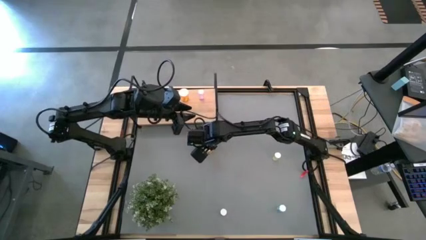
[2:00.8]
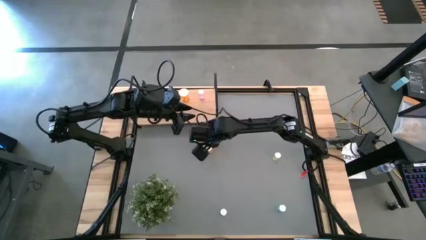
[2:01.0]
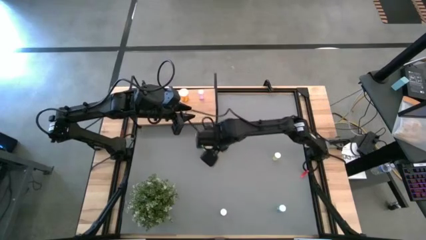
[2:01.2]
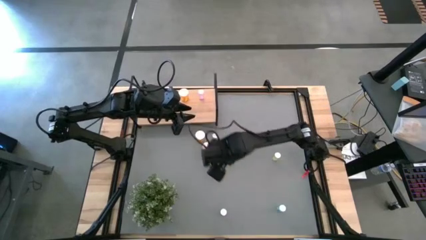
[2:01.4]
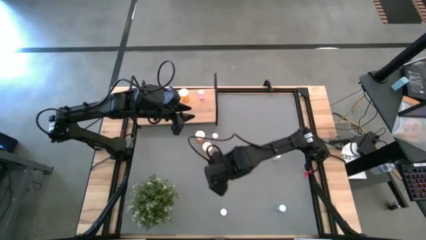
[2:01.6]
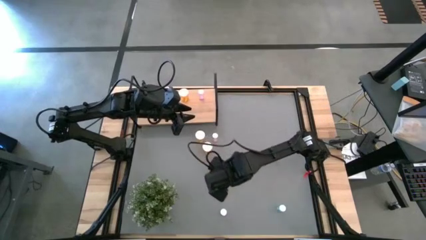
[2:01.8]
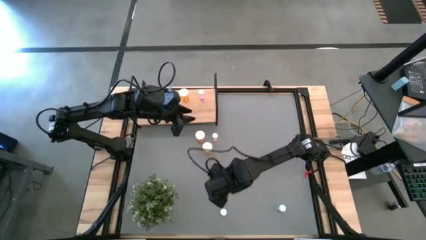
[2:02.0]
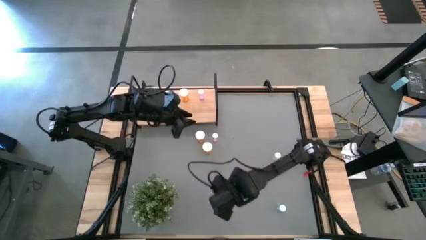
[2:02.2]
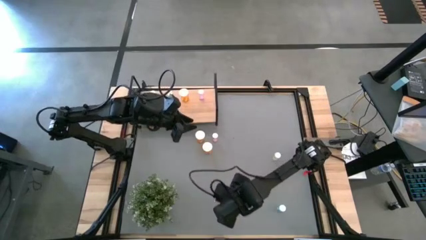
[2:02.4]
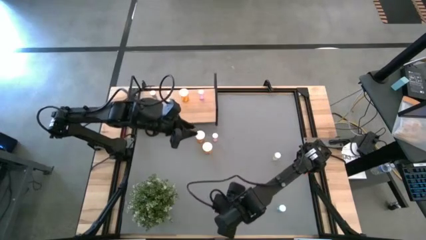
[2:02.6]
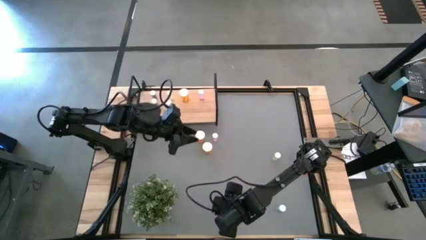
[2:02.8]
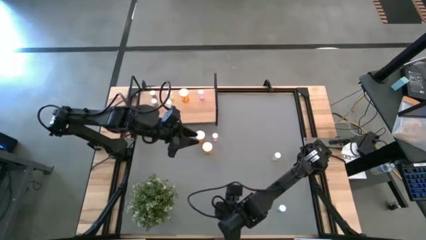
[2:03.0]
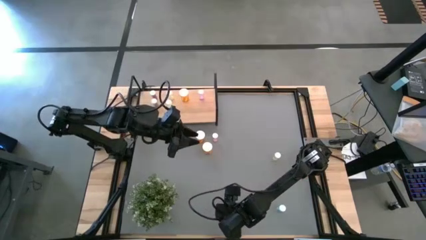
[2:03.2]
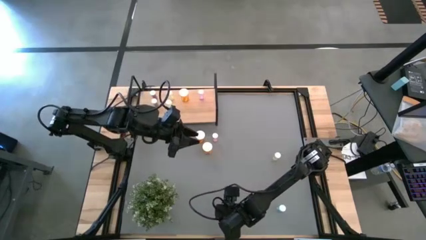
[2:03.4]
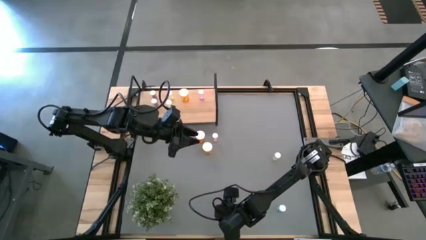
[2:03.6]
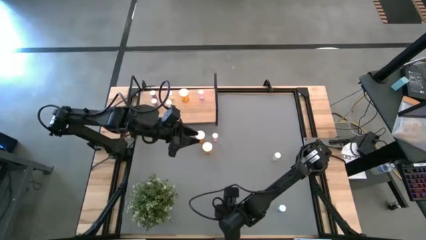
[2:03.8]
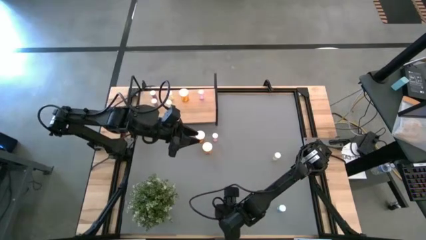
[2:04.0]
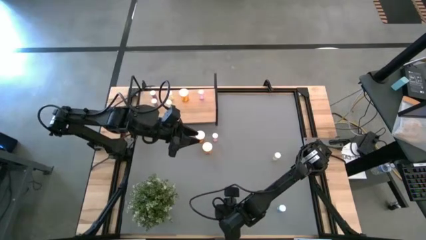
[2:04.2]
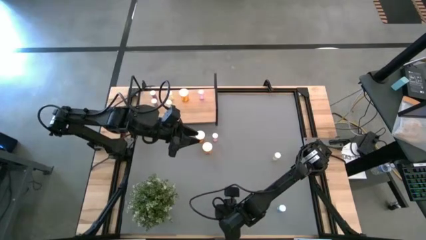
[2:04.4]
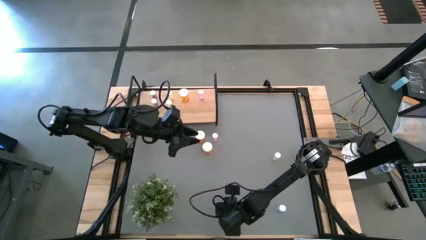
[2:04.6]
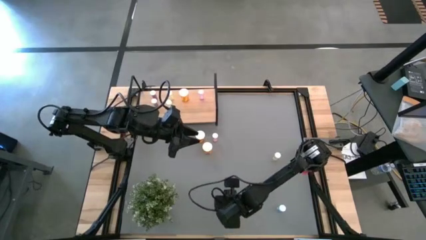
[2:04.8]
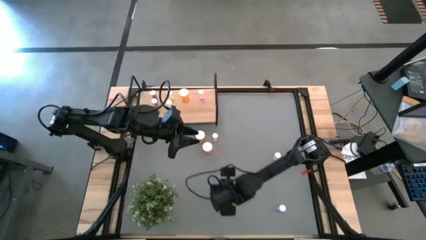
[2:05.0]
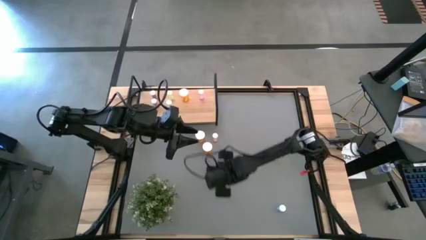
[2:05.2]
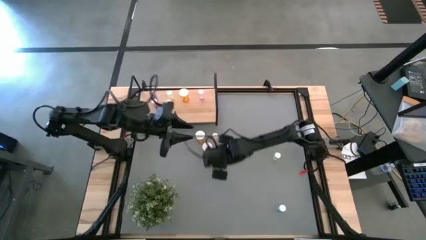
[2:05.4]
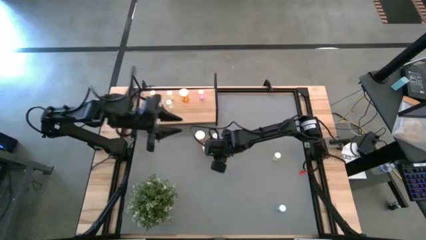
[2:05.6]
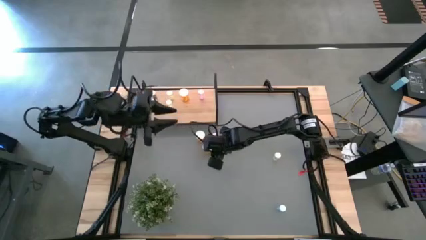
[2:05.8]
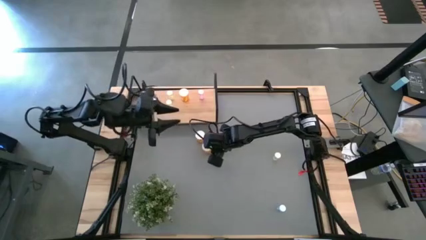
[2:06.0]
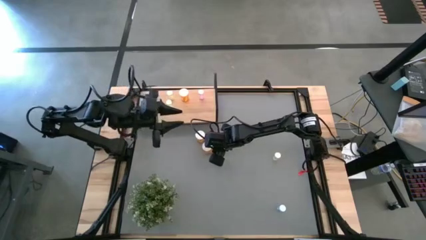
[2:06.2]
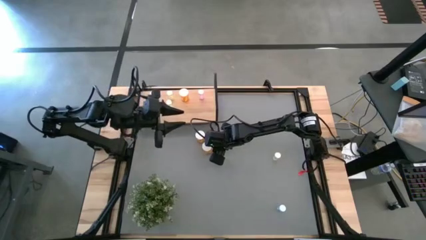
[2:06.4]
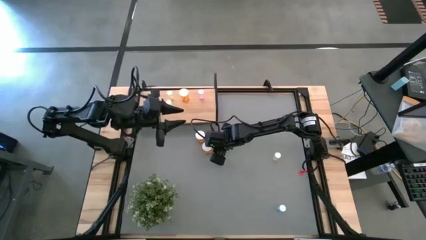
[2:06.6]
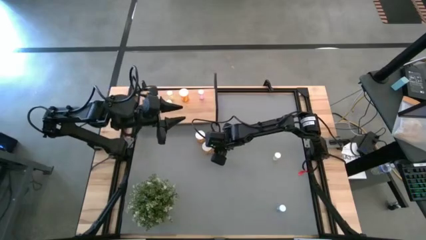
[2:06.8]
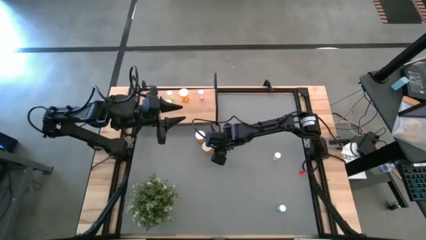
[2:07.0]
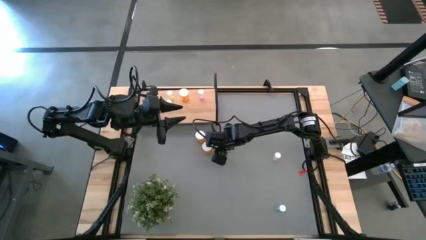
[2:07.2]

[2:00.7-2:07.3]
Task: Pick and place medicine bottles onto shelf by color
Move the bottom pink pill bottle to the middle of table

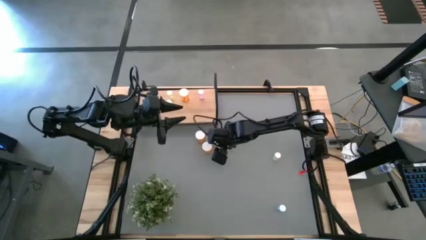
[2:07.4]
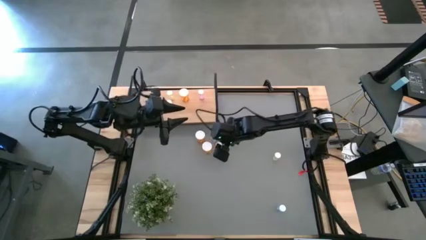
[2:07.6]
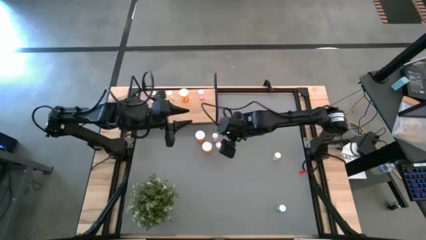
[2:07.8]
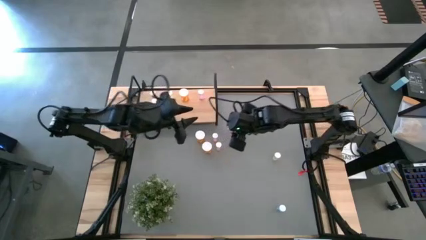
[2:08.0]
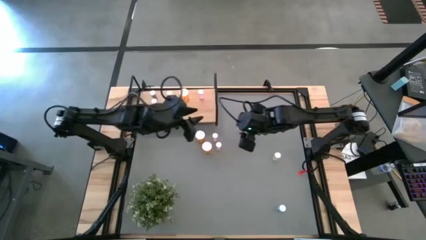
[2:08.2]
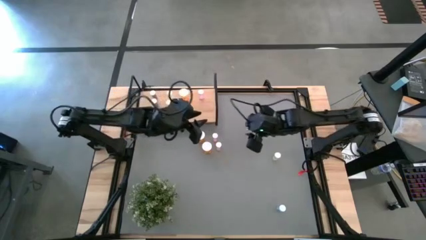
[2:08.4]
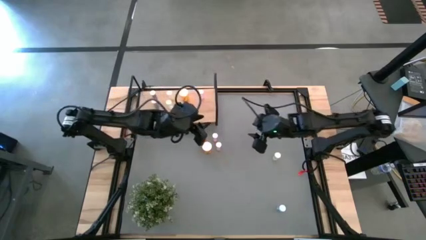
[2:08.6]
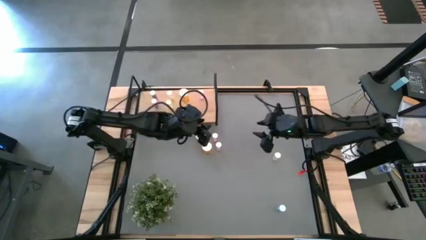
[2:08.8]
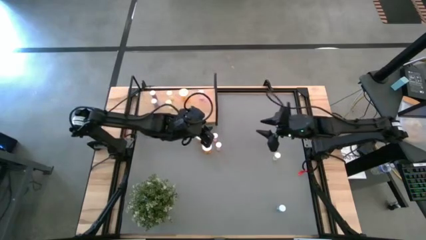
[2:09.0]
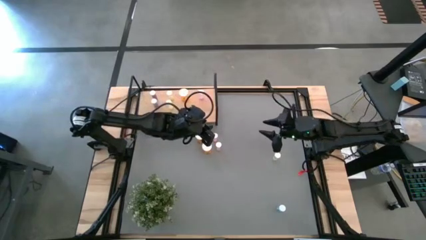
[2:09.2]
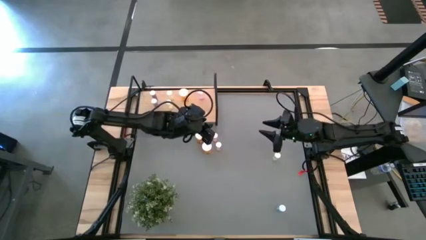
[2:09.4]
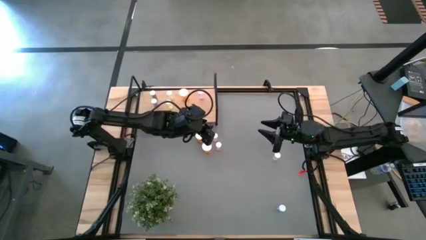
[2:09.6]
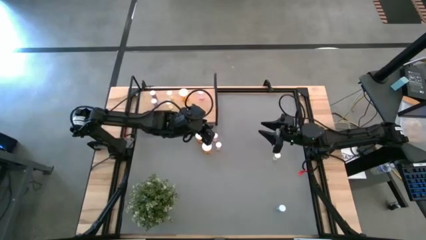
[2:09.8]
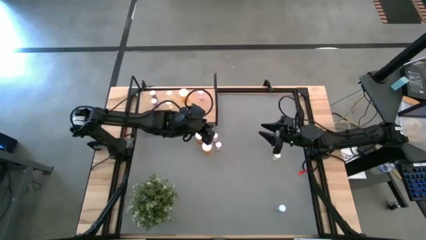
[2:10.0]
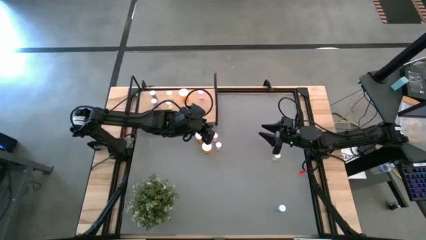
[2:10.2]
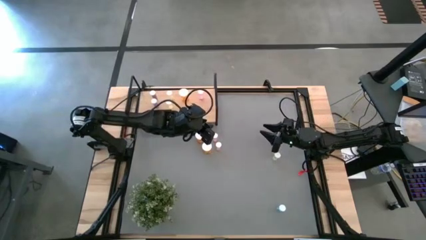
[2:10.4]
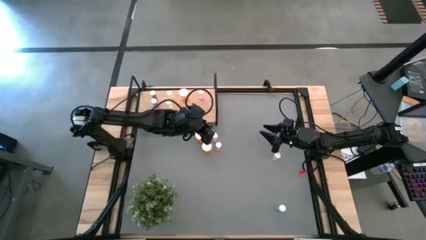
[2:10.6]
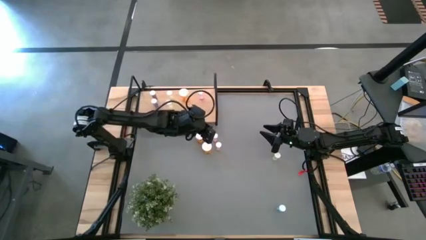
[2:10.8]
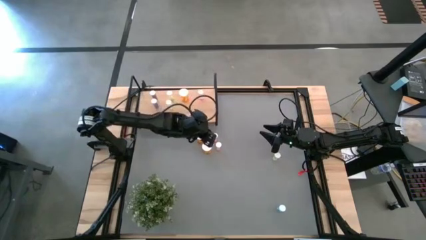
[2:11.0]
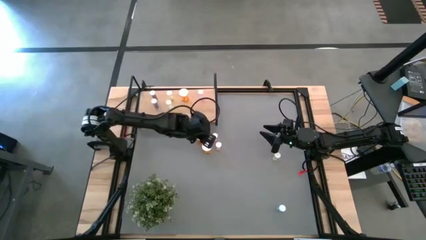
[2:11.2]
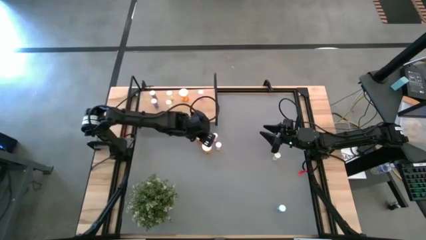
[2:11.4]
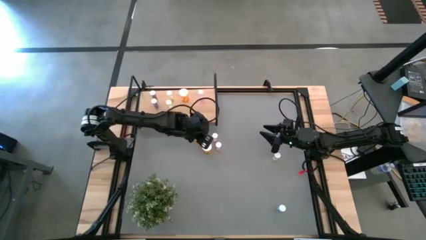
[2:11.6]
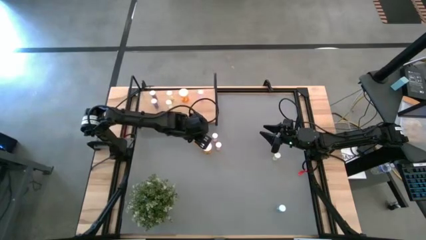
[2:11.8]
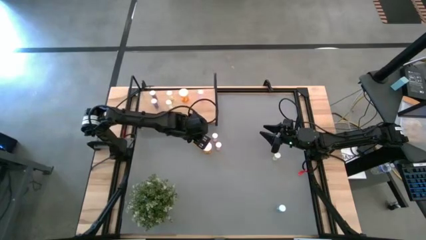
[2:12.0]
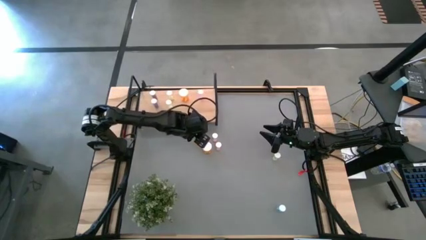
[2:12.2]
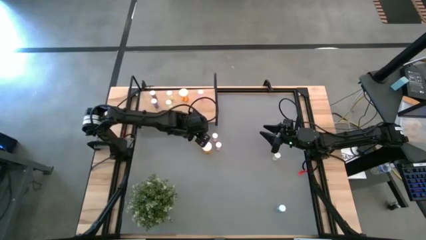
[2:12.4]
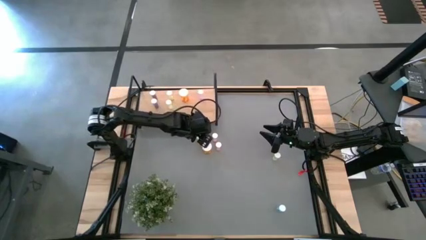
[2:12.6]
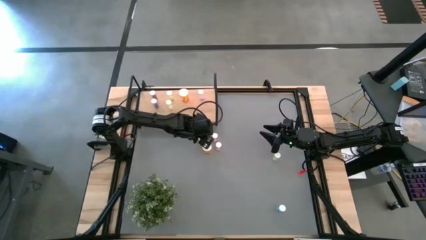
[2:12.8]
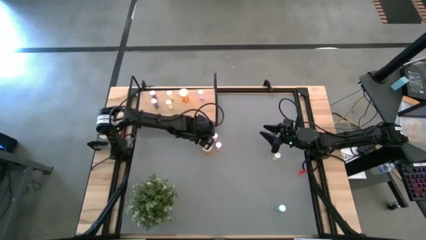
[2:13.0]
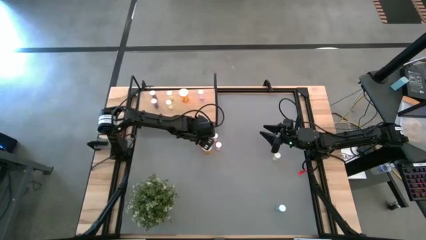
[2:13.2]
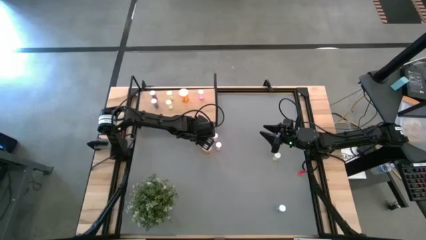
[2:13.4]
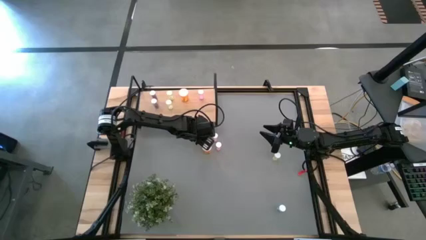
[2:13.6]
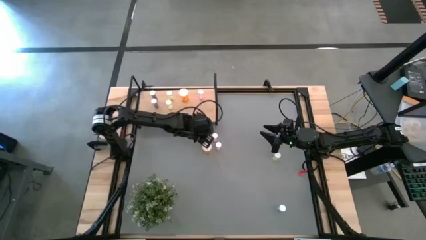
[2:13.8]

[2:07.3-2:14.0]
Put the top orange pill bottle on the shelf

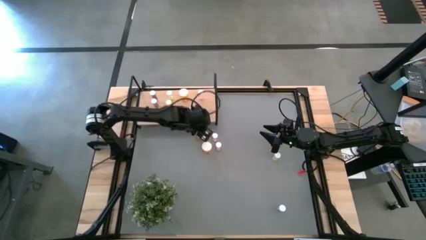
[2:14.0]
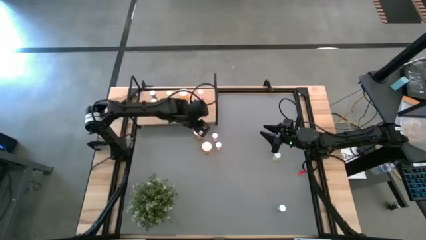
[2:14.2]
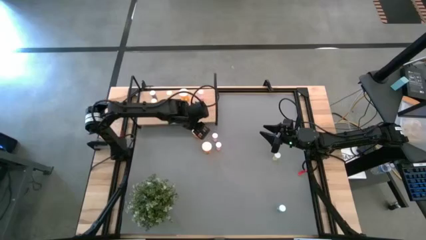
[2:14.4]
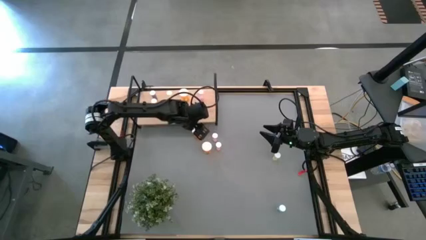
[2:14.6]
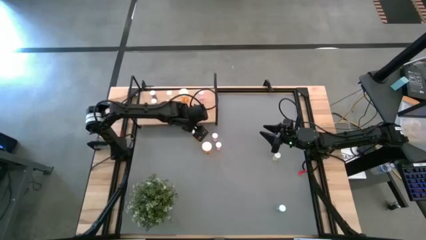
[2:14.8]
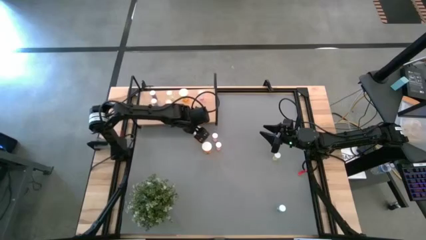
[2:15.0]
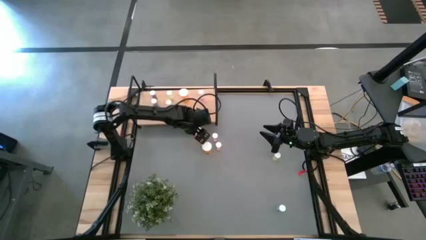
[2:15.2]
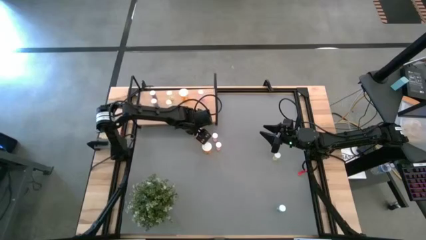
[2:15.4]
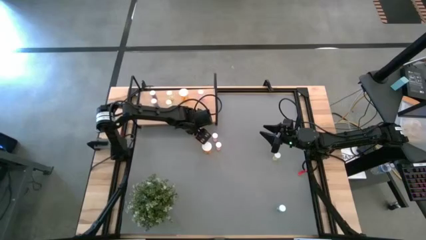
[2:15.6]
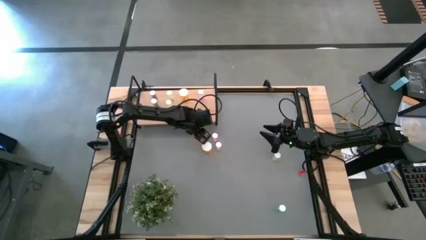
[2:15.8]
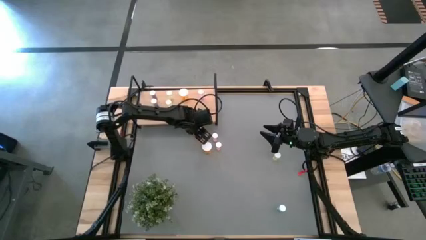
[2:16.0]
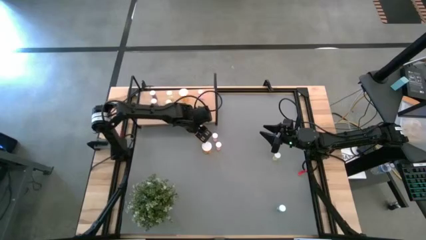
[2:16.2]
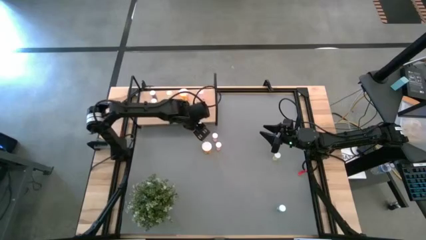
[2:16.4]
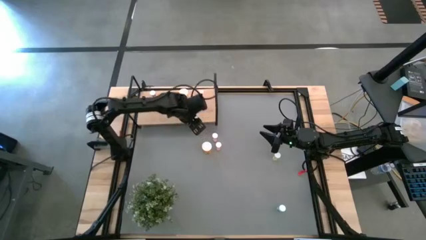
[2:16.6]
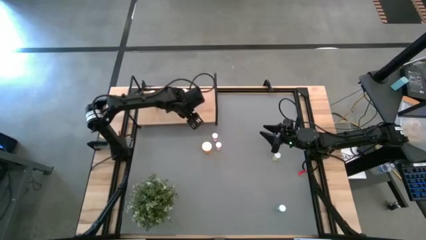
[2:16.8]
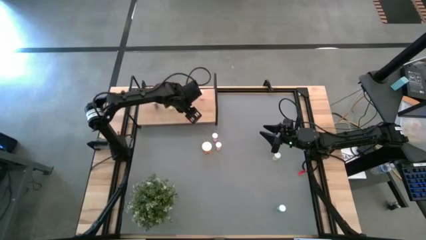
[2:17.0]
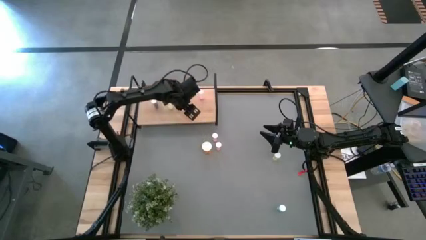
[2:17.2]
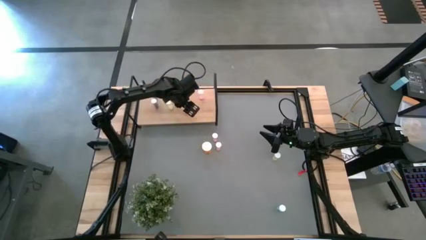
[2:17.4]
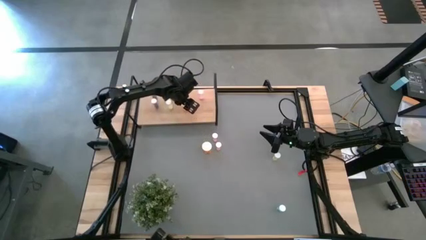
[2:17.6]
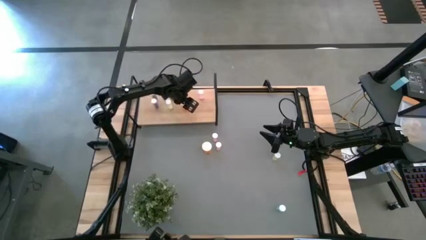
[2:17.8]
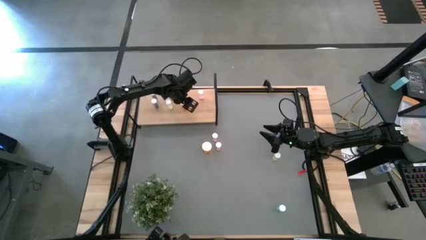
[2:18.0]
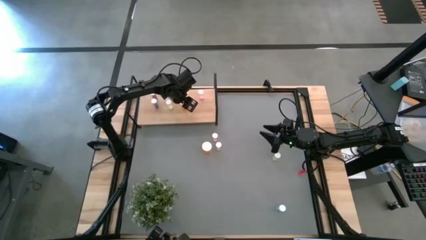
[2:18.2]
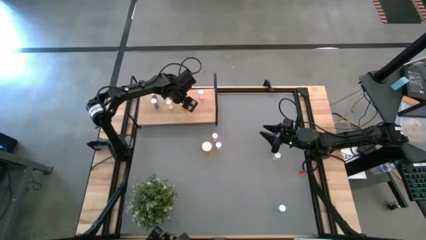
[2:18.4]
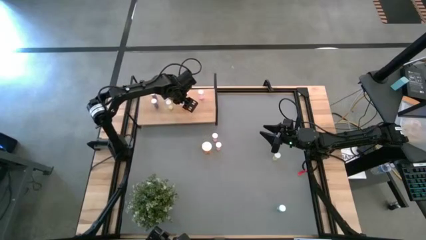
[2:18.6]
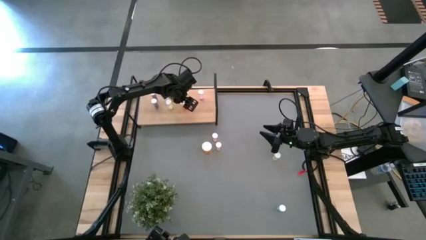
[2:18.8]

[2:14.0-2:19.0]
Put the orange pill bottle on the shelf
